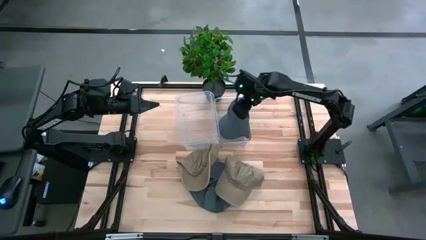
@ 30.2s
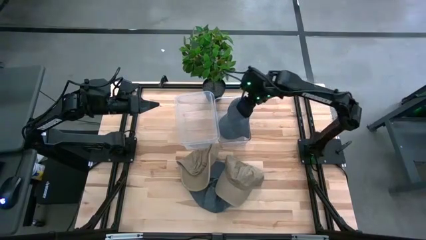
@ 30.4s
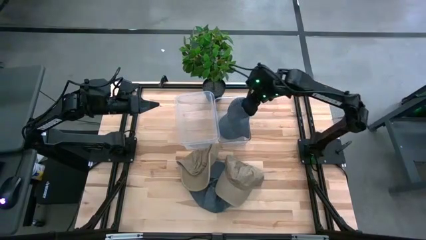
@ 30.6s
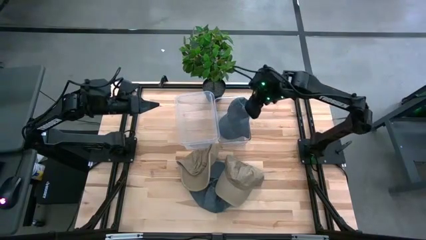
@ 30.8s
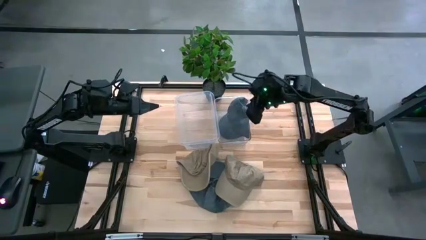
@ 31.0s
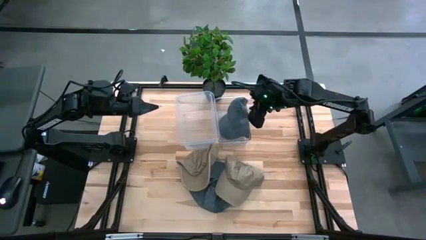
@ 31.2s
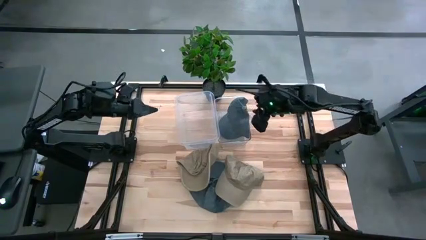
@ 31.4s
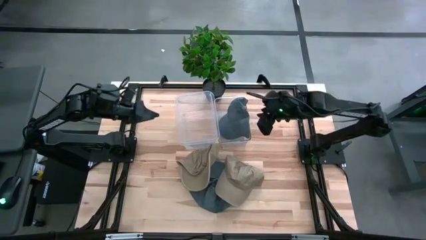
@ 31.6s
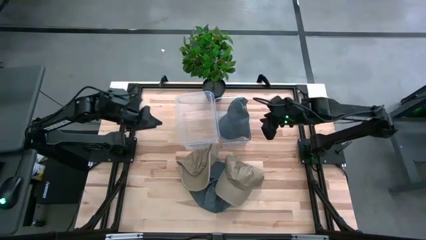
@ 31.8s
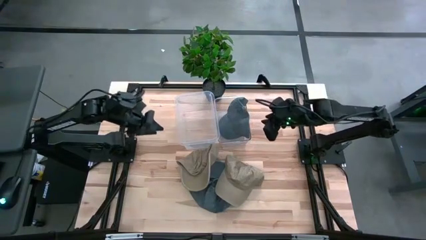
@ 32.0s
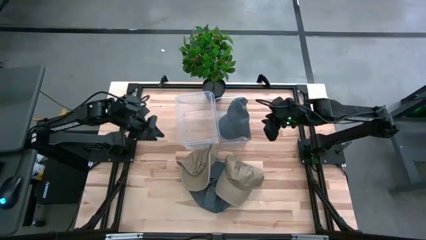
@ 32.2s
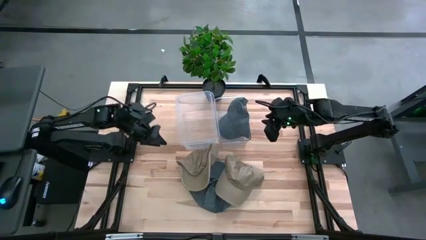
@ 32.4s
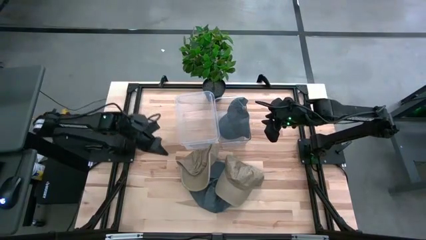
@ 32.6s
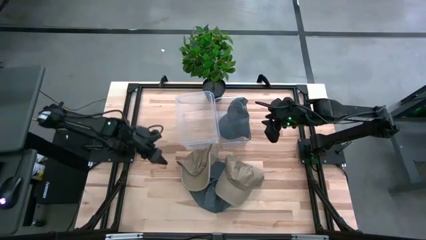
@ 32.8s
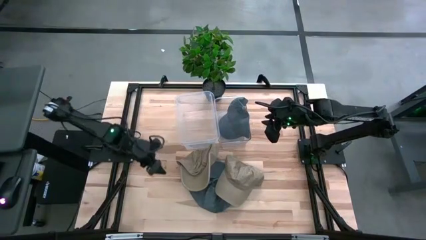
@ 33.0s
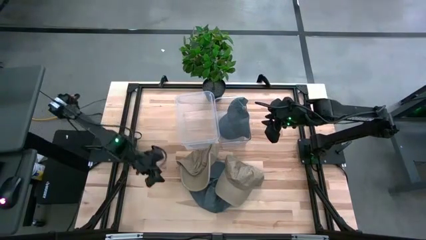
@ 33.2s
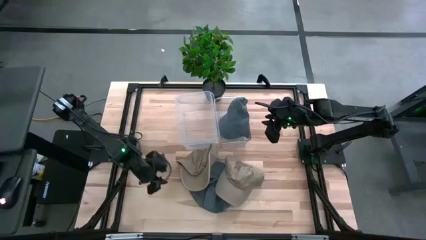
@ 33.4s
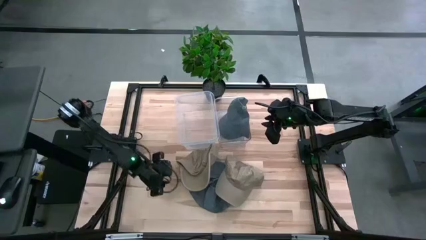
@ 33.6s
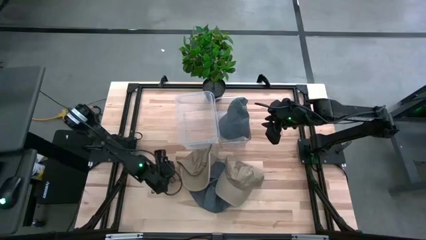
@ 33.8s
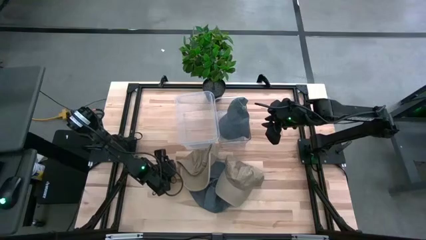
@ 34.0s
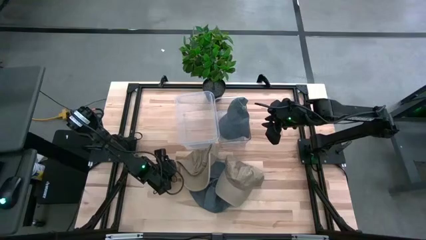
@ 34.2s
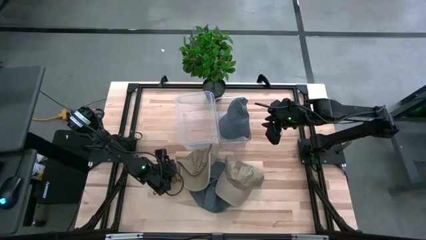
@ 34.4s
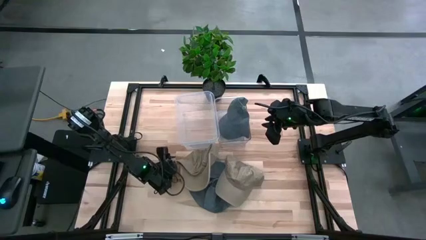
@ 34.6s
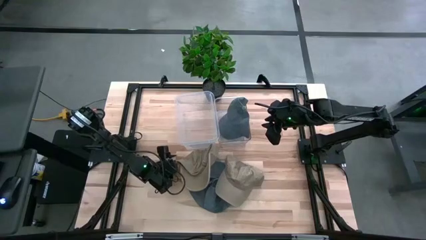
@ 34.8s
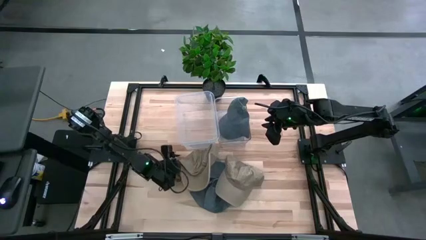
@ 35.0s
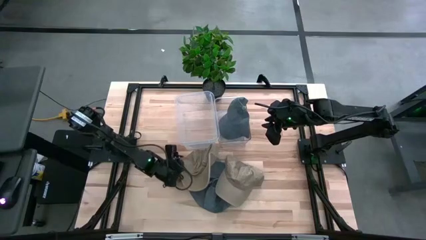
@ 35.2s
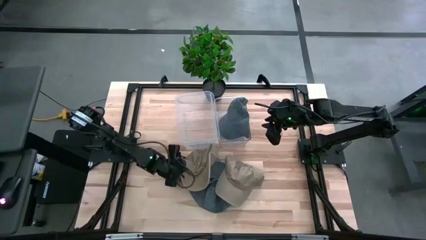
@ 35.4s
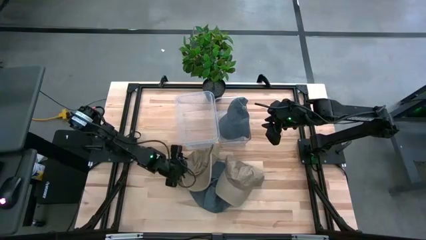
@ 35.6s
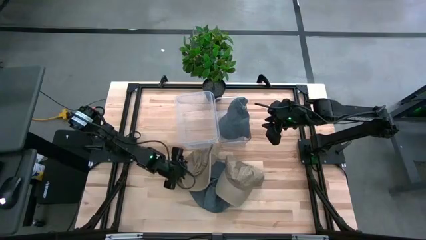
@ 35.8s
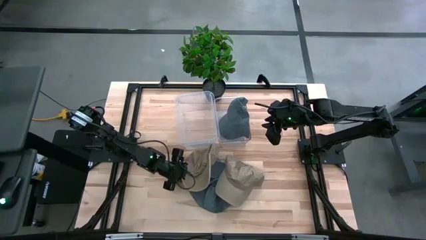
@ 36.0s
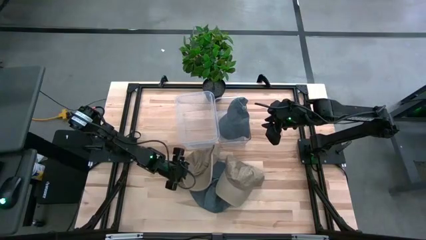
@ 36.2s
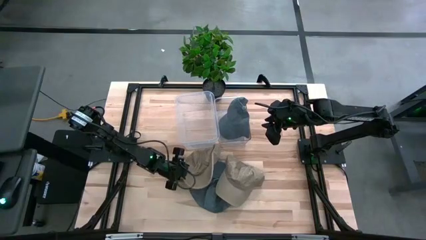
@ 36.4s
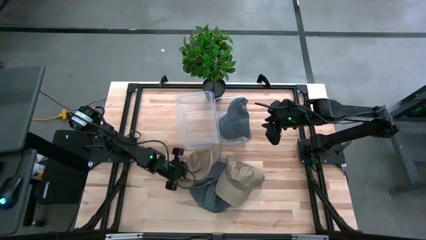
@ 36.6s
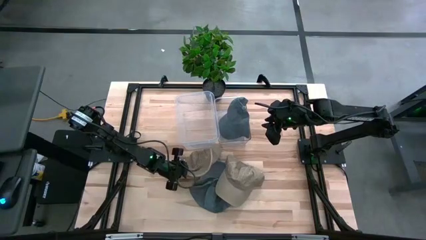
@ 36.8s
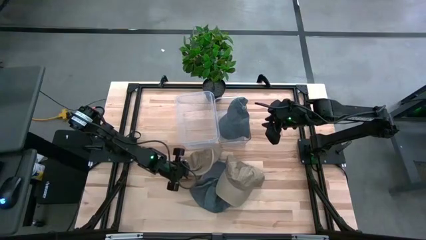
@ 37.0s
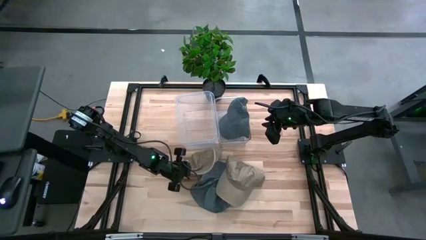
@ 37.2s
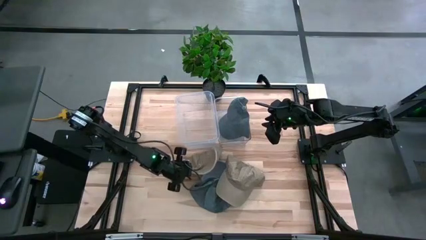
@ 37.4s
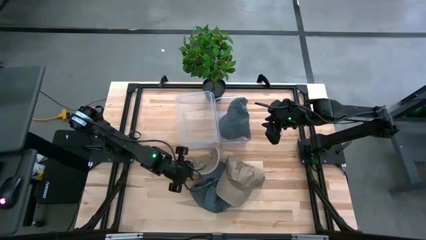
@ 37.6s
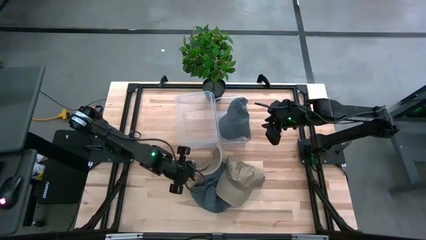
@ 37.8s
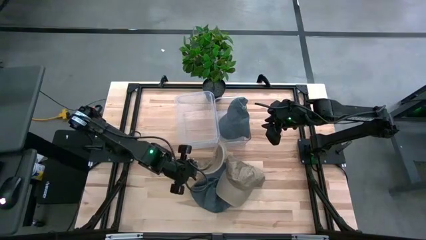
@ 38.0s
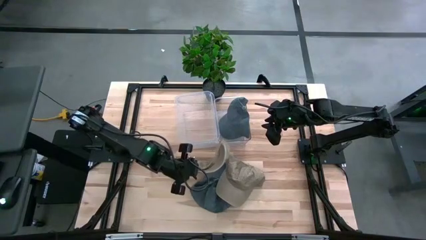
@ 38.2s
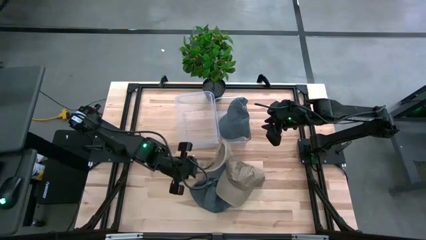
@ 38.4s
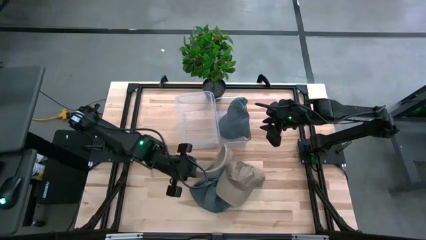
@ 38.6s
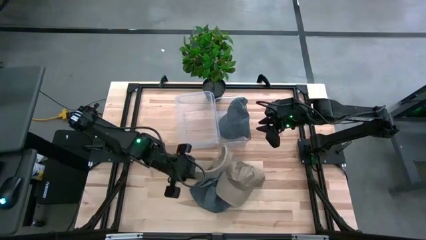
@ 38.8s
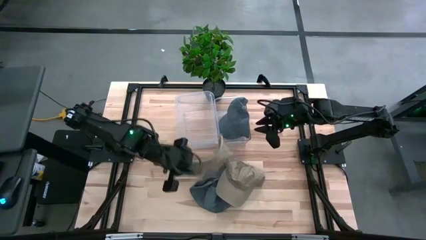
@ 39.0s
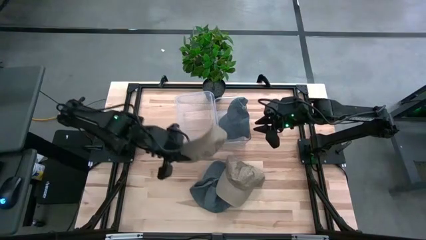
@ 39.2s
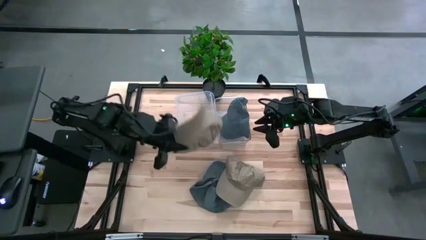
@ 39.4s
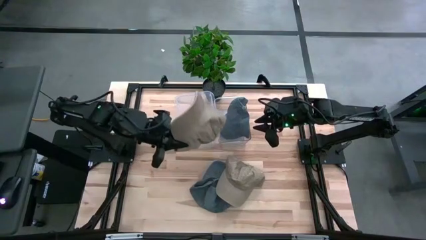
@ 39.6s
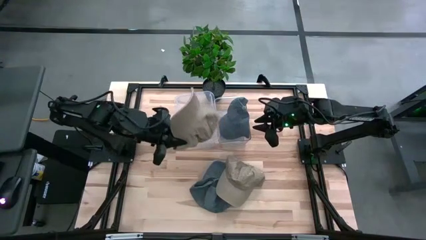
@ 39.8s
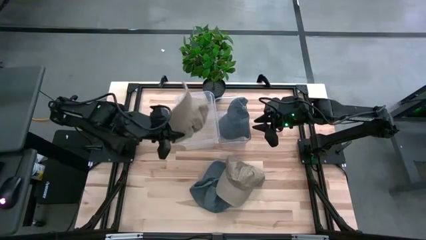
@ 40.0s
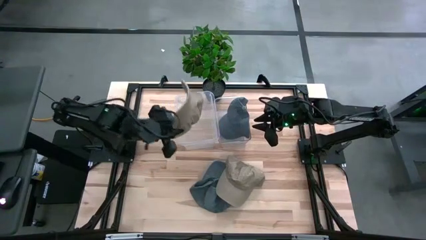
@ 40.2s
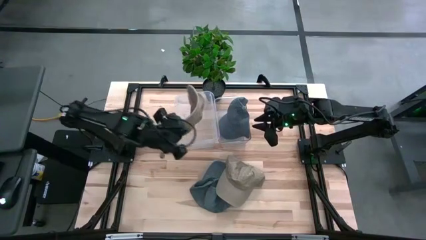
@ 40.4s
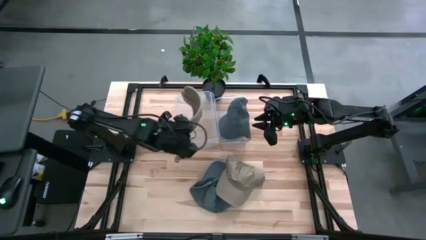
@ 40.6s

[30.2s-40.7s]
Task: Pick & Place hat
Put the left brown cap into the left transparent bin
